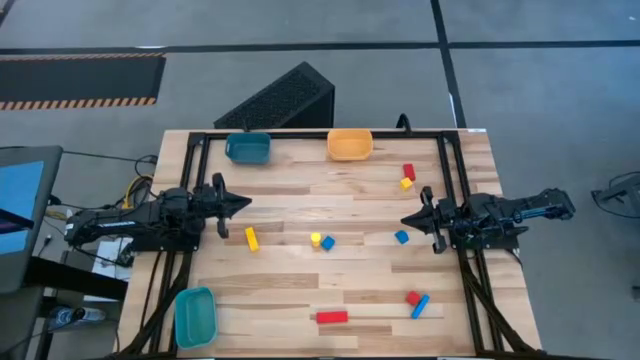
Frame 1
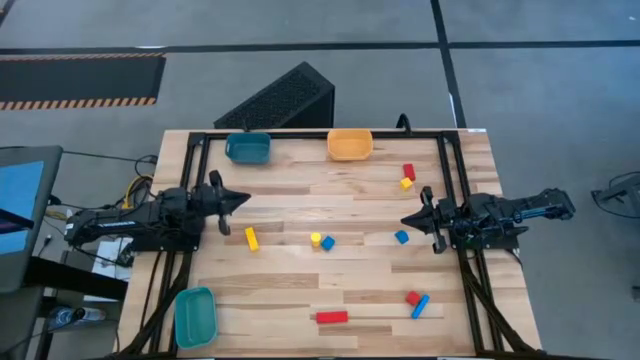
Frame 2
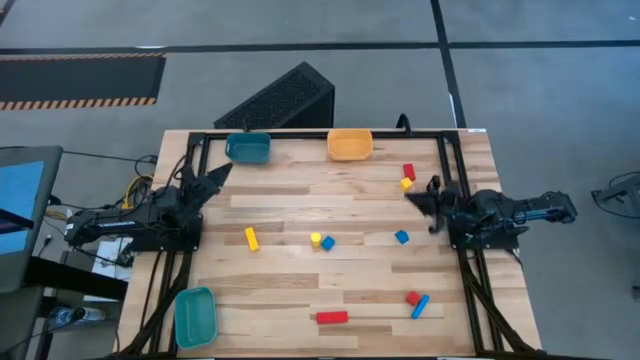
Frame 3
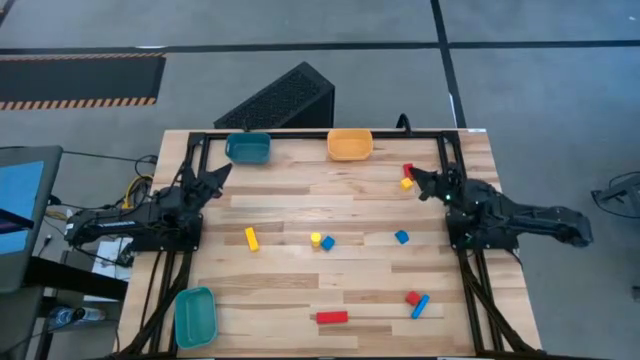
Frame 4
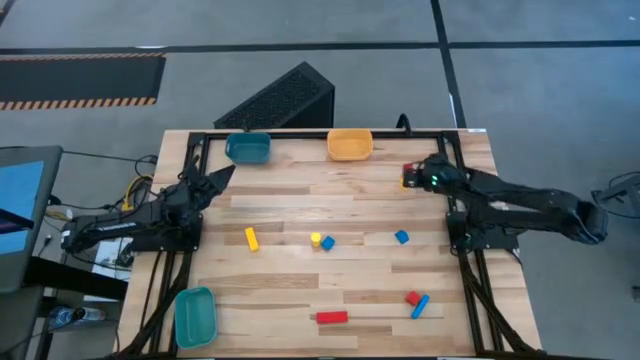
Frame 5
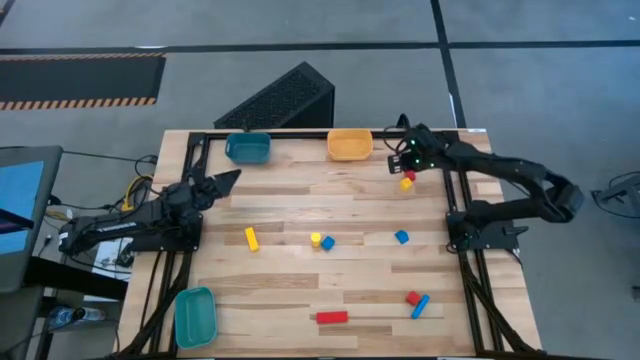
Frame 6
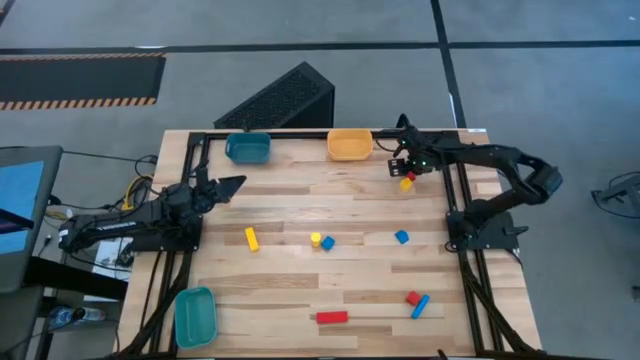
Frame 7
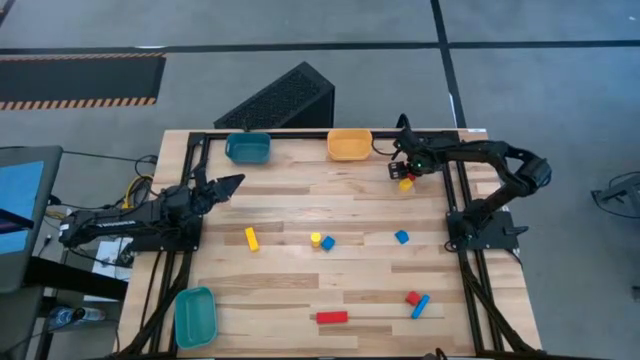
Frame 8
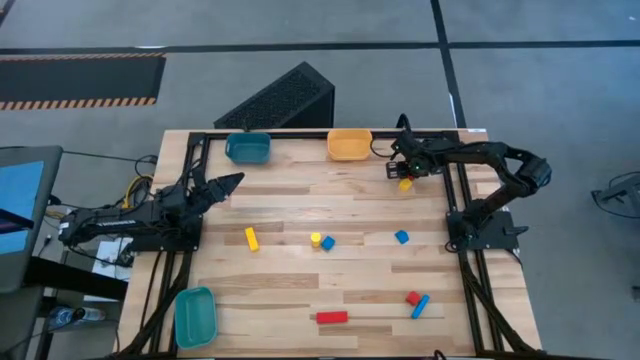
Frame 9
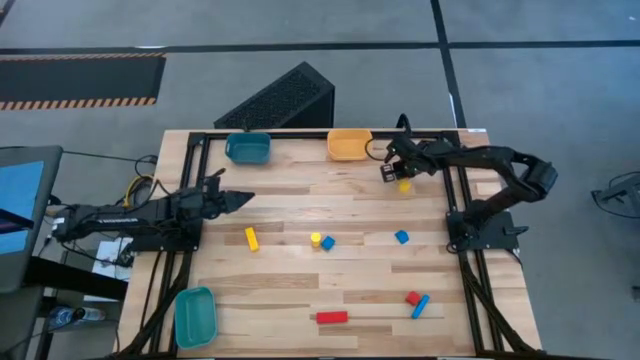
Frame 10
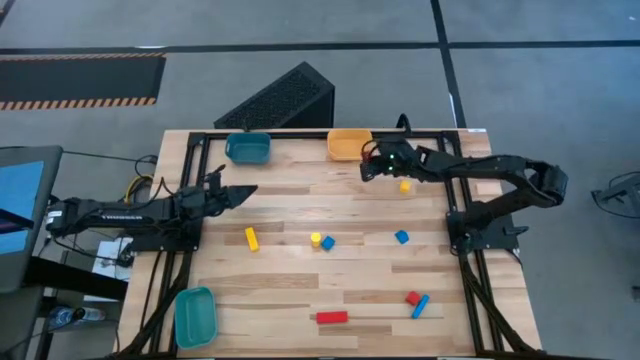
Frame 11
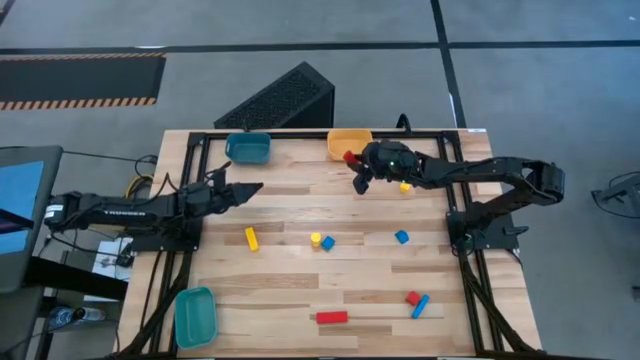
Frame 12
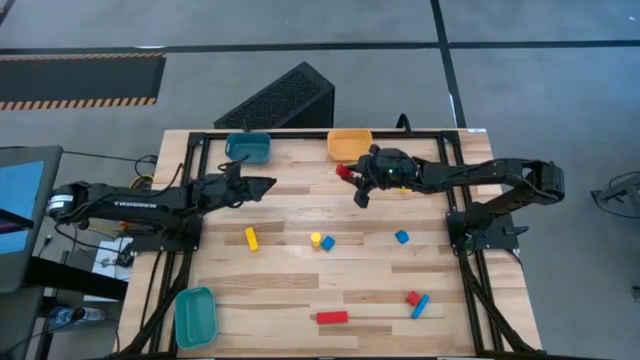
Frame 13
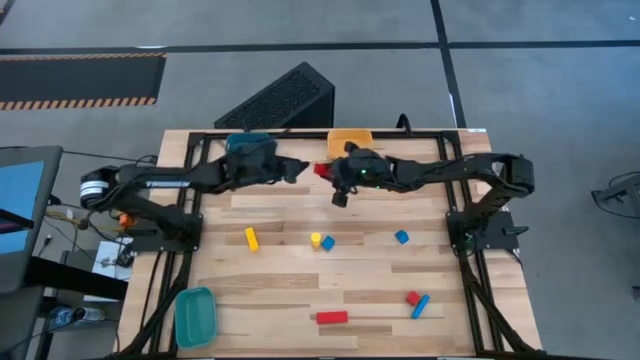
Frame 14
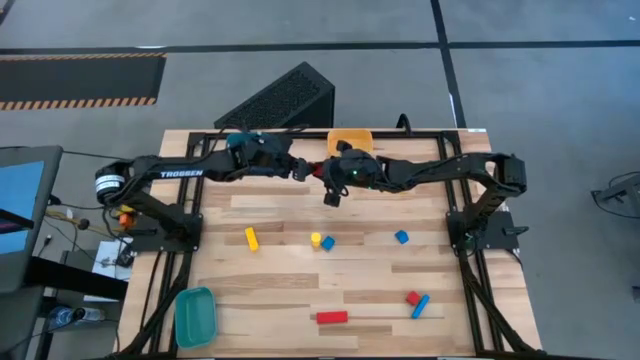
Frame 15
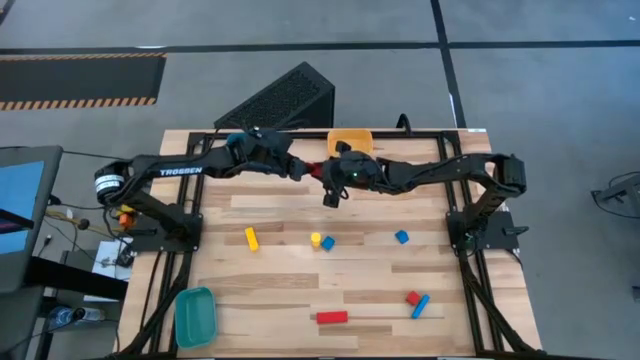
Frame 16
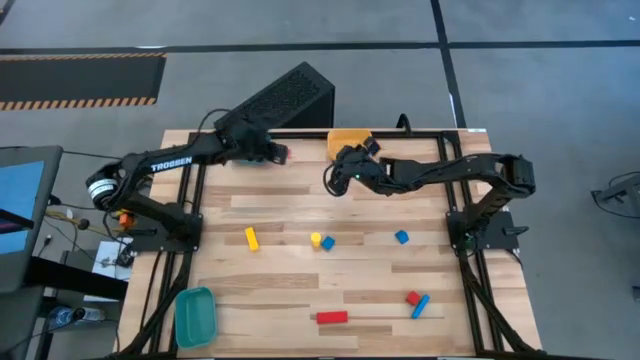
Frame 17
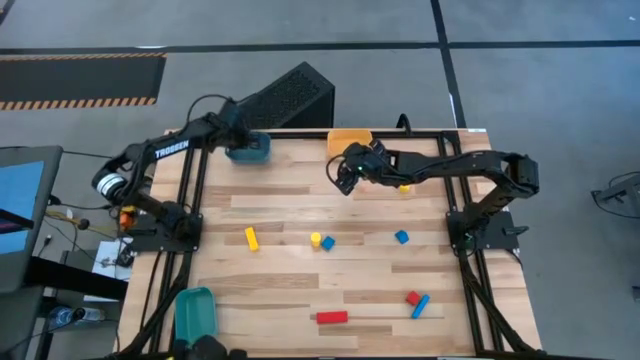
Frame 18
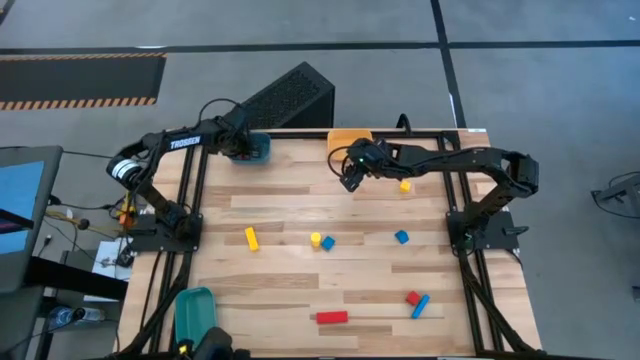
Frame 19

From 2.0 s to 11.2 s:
Task: Sort & place blocks by color
Put the top right red block into the blue bin

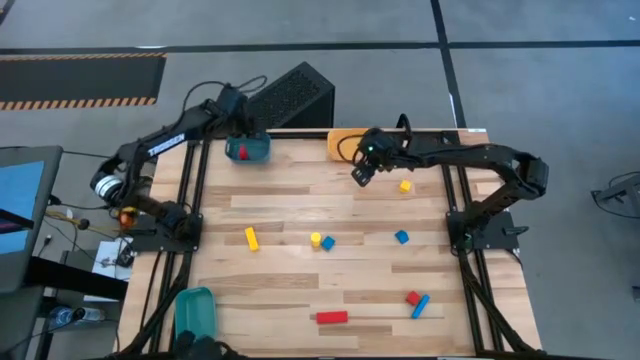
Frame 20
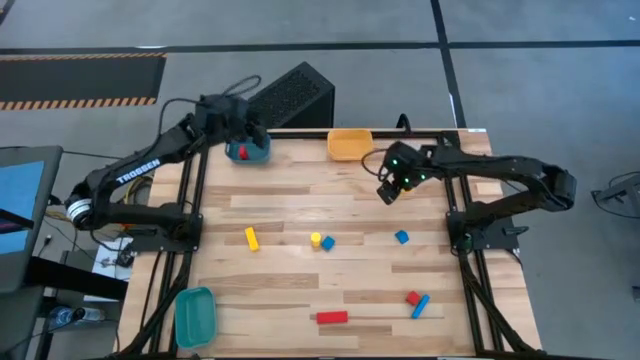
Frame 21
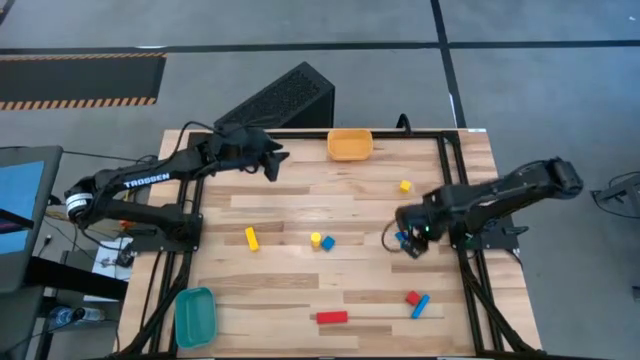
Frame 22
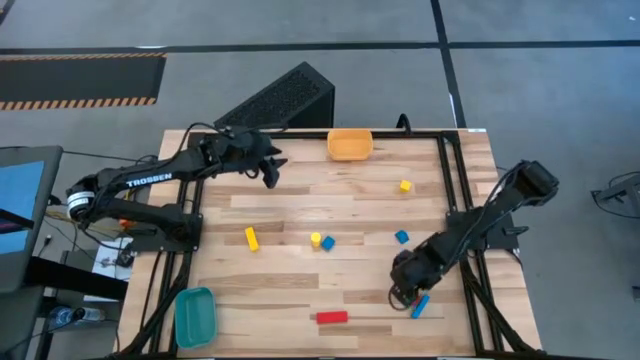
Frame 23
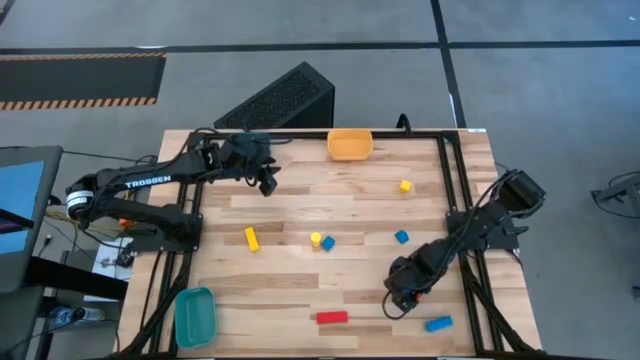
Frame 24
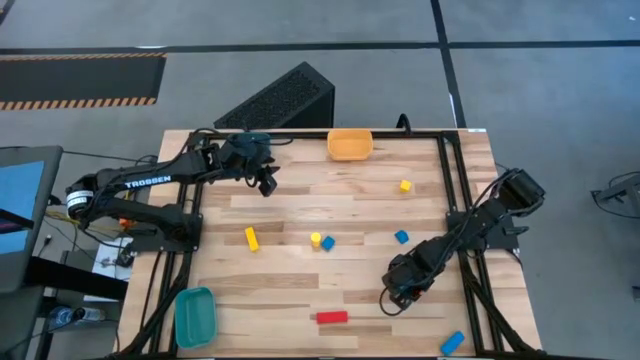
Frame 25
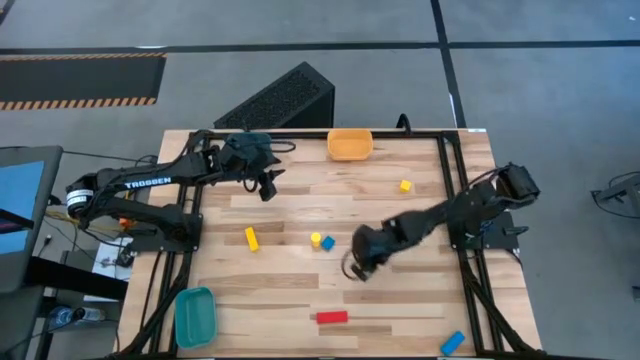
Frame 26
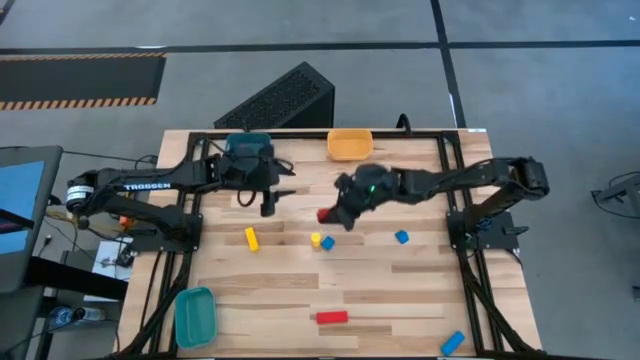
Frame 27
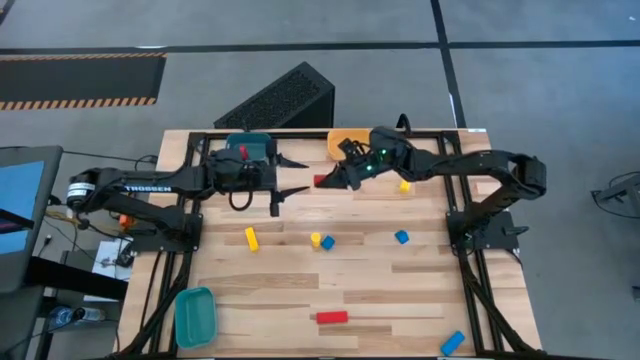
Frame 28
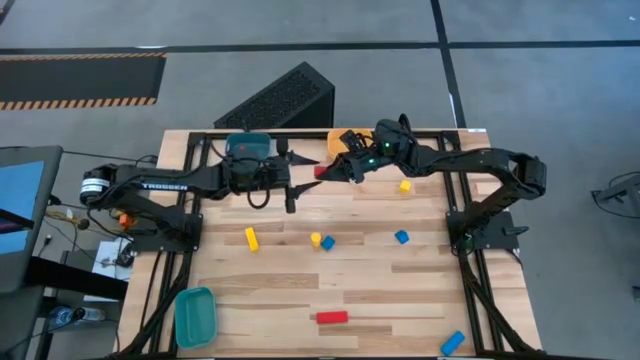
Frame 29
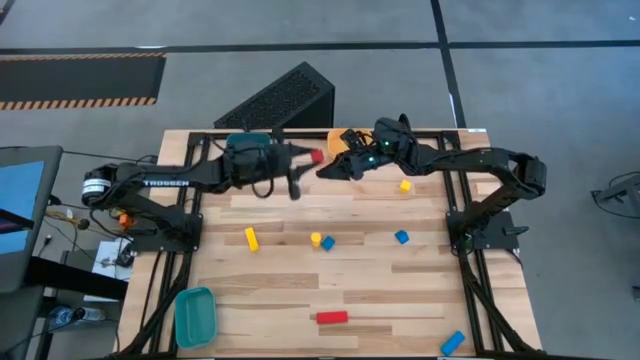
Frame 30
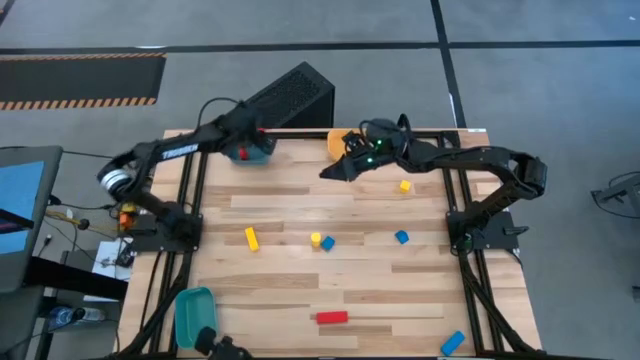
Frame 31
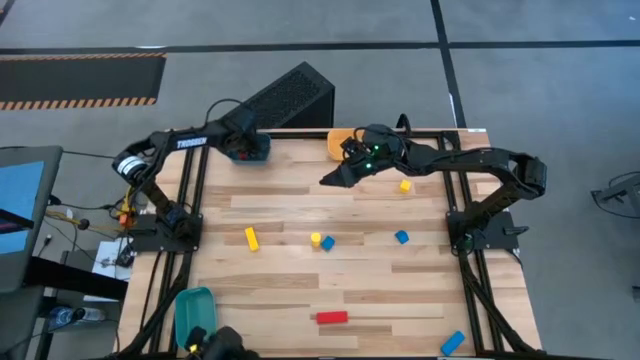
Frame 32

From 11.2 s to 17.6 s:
Put the right red block into the blue bin

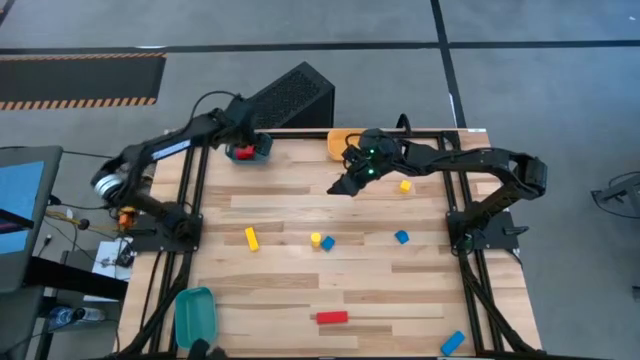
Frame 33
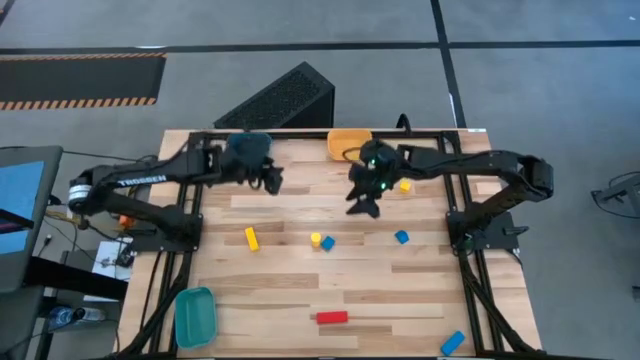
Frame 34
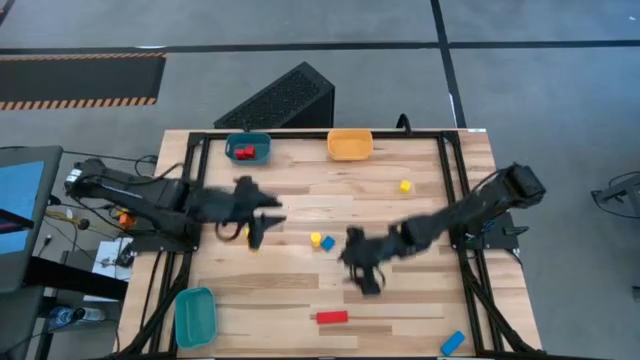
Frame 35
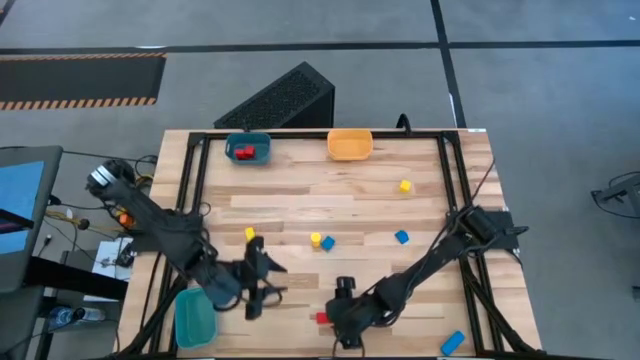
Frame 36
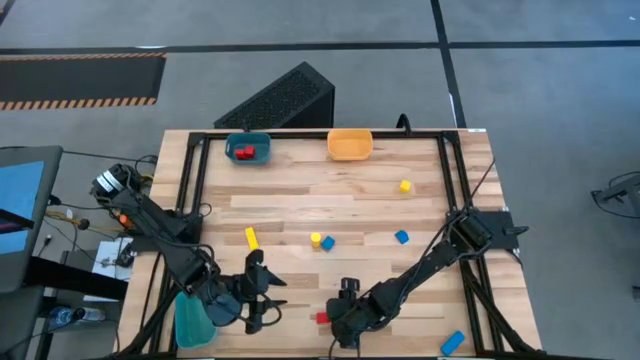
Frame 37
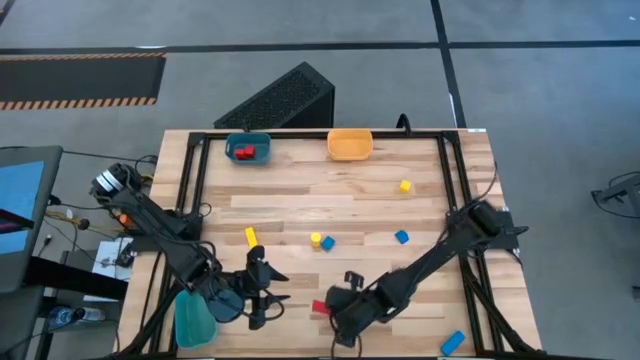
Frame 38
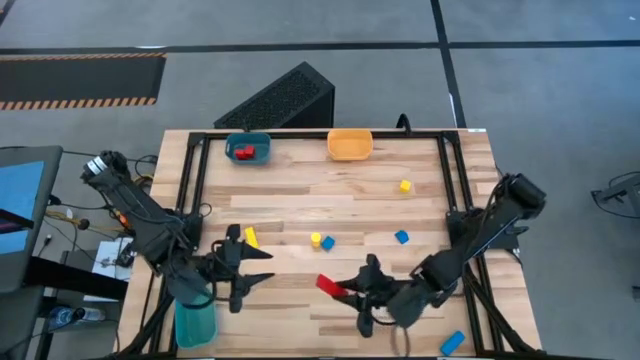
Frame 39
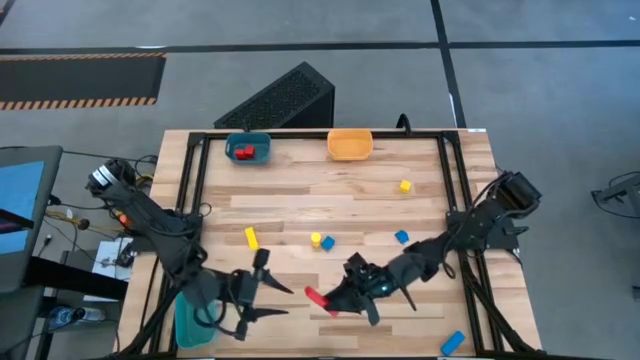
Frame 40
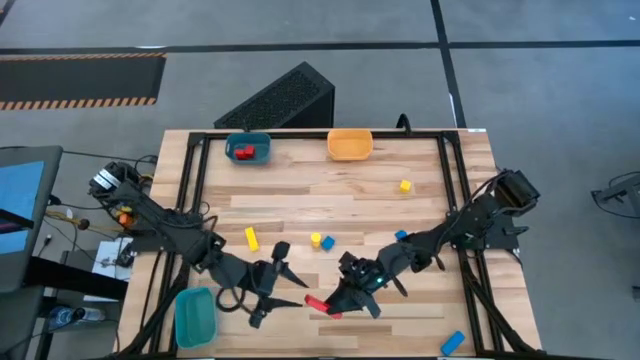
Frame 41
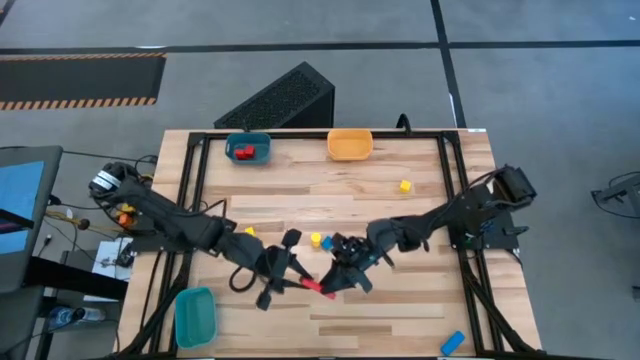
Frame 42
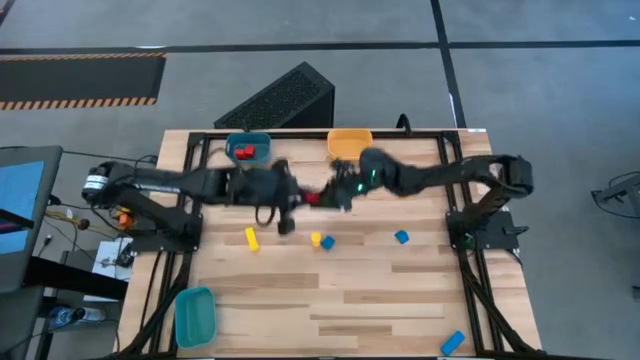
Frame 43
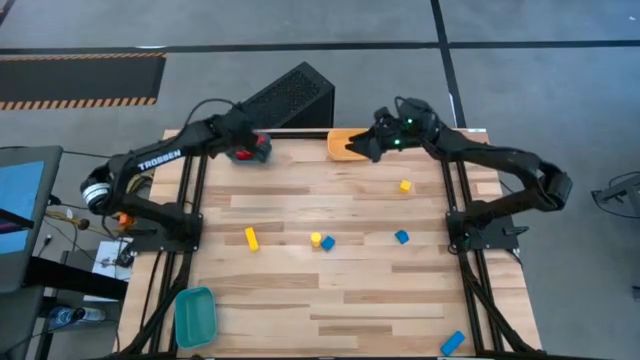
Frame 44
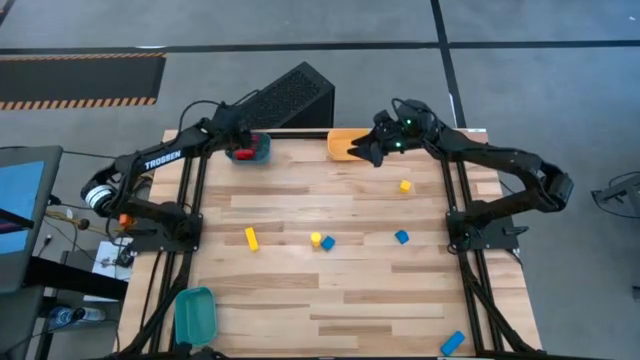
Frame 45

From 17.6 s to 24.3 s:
Put the red block into the blue bin
